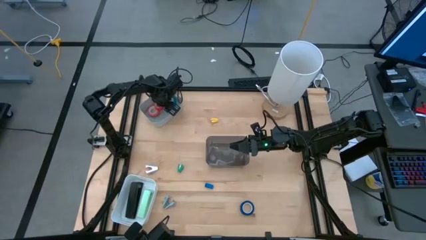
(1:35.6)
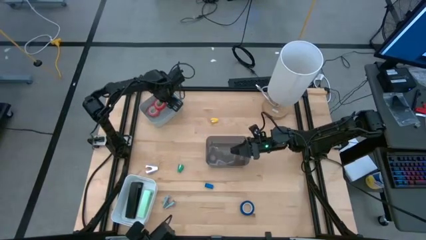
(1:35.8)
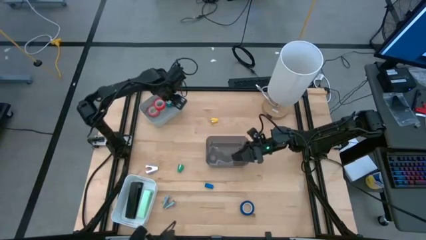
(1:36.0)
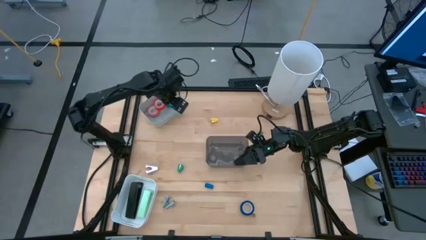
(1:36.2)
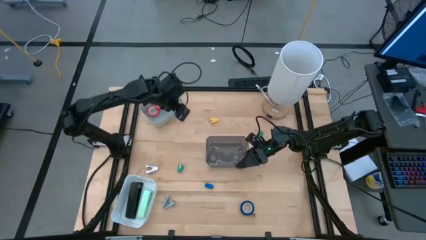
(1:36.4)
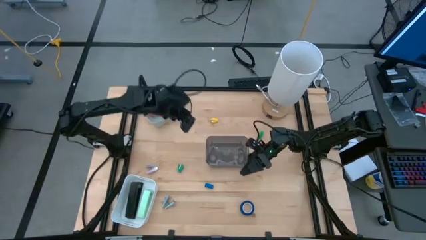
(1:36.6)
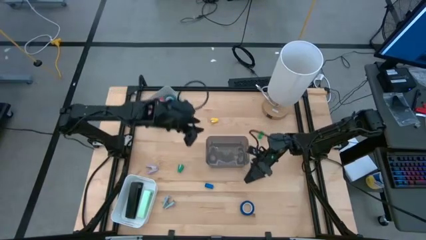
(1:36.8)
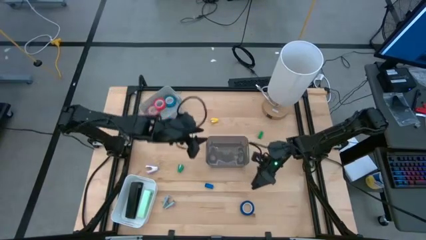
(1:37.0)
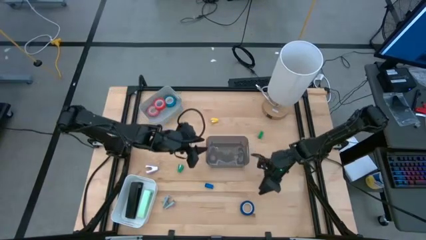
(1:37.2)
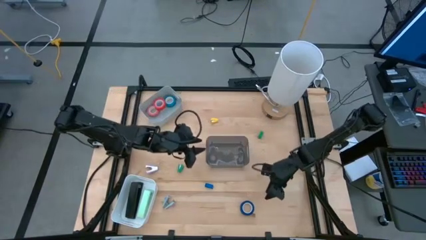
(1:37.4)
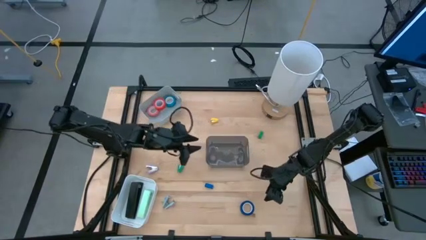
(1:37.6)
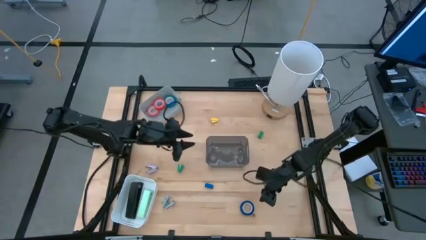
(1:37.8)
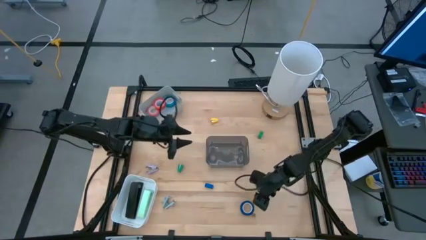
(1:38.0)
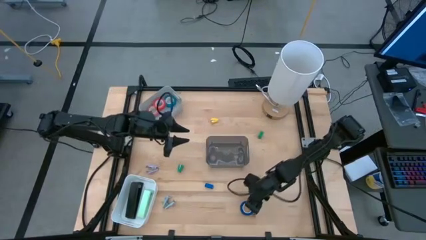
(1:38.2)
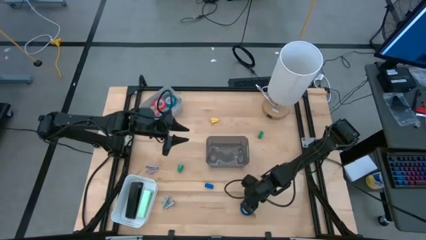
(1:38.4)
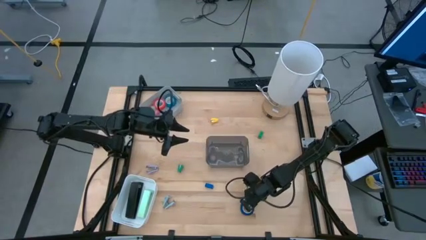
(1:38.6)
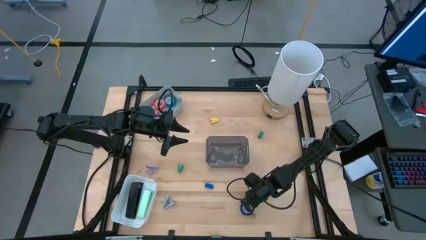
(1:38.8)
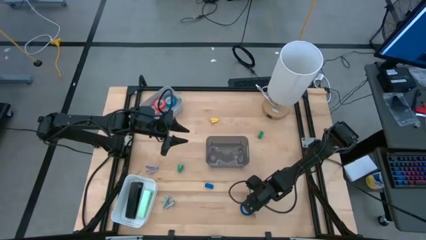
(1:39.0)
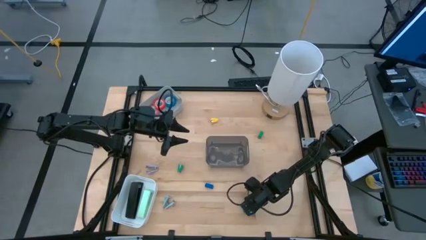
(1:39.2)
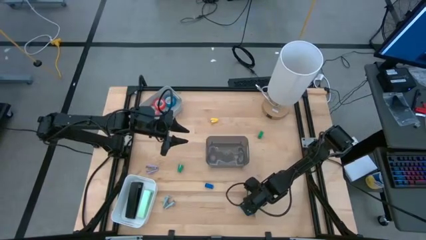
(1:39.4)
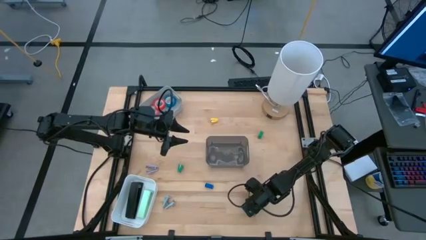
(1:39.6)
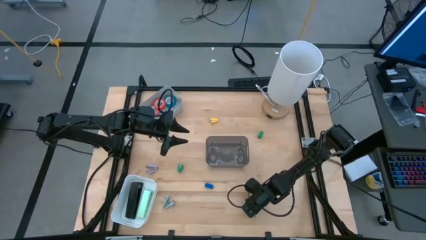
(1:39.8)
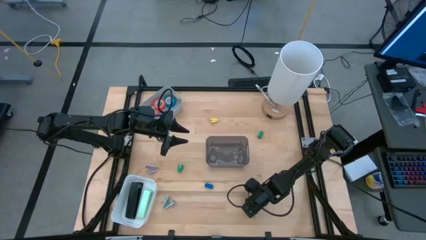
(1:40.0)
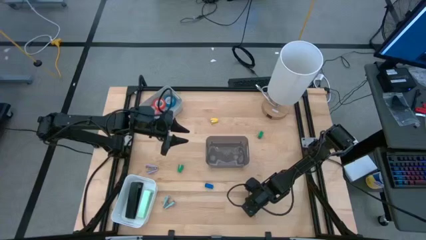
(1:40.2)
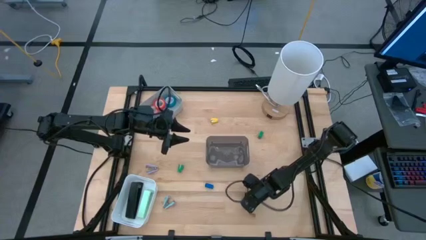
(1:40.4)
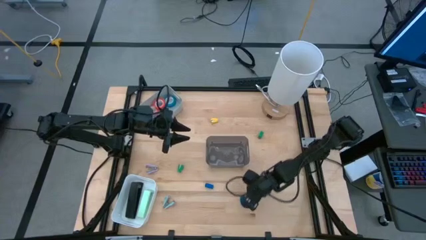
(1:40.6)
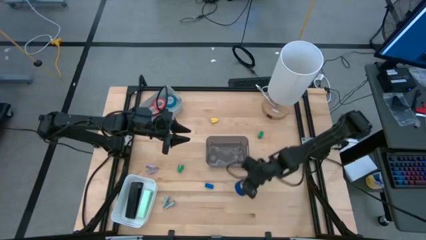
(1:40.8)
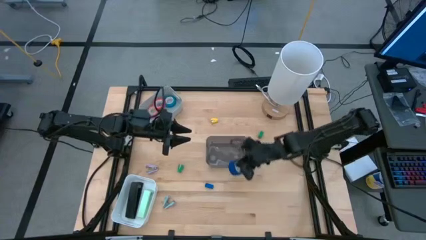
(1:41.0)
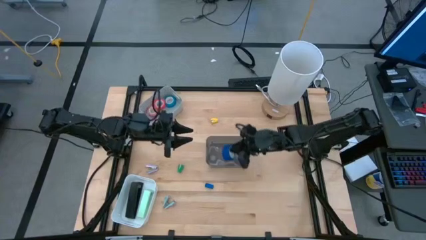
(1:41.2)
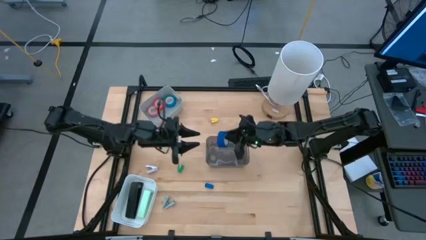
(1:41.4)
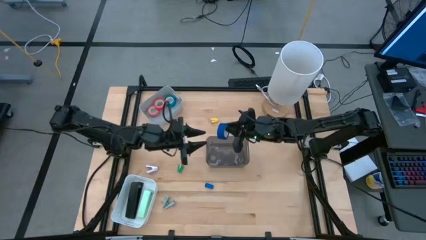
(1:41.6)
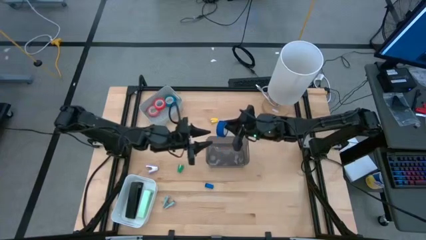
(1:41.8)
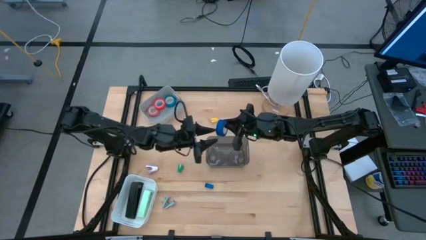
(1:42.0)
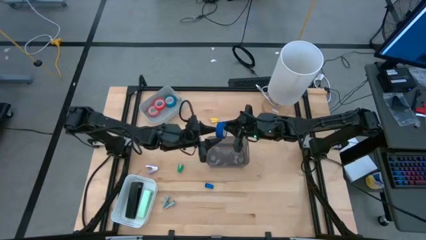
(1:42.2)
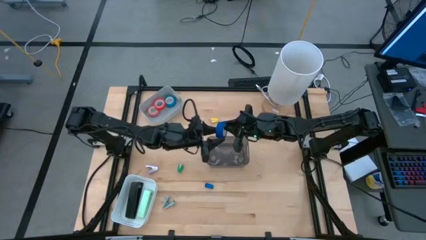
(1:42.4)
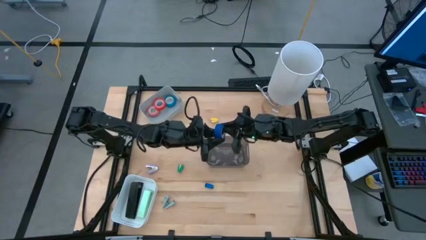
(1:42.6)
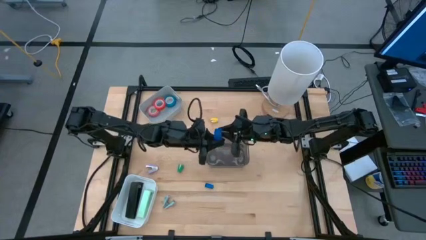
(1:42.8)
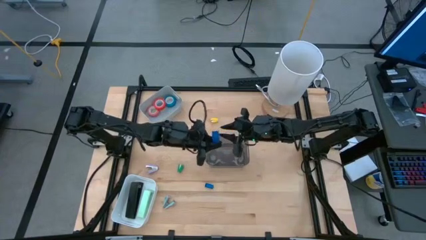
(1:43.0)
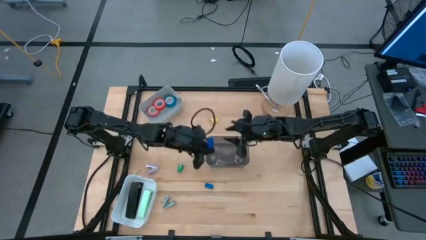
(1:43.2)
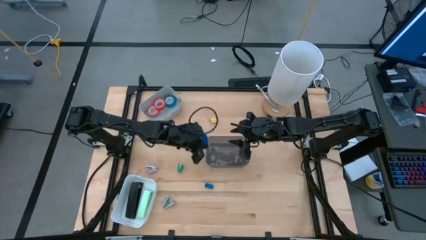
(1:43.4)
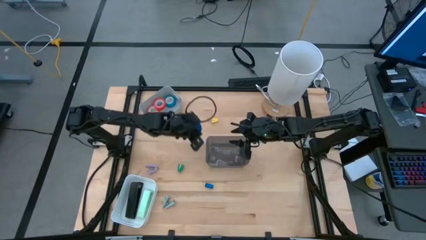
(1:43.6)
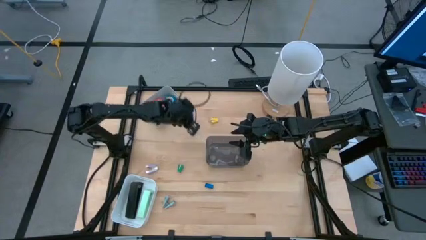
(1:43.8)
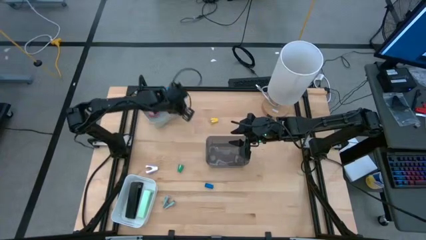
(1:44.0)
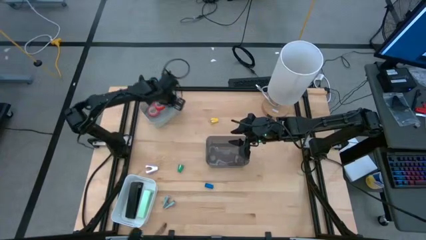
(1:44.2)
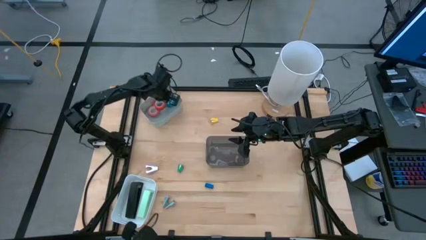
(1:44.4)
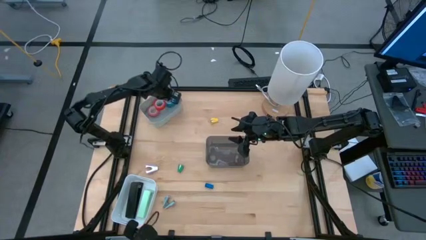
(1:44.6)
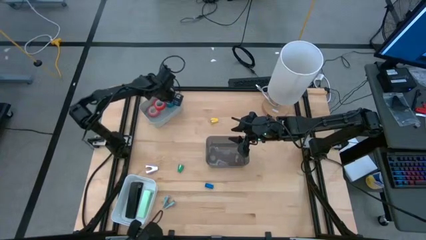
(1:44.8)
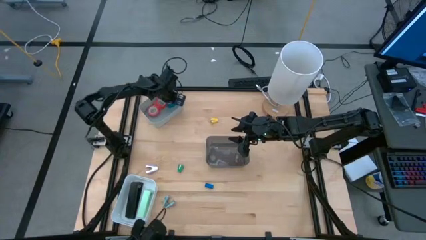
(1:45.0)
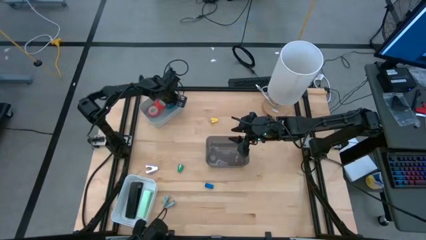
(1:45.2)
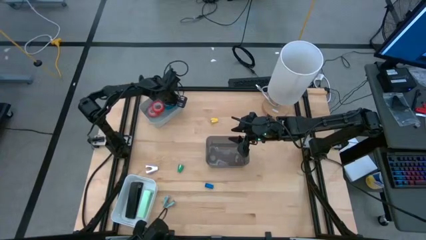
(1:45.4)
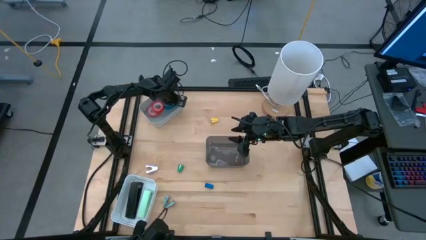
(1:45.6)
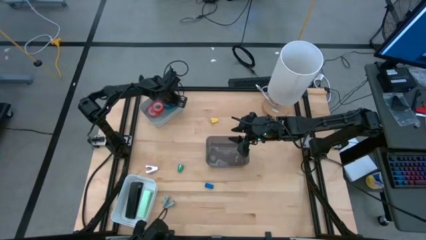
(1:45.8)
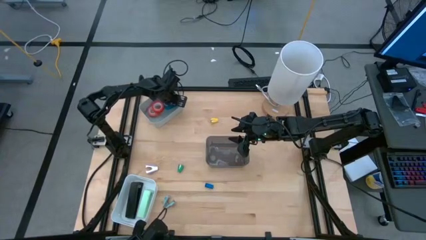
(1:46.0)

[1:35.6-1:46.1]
Task: Pick and place Stapler, Stapler remover, tape
Put the dark blue tape into the grey bin

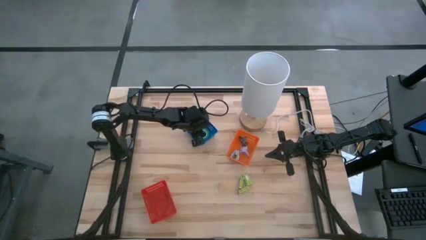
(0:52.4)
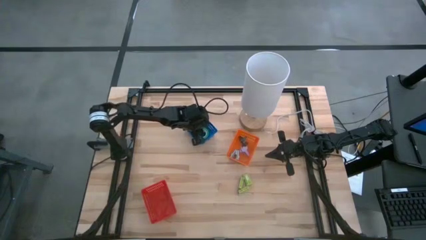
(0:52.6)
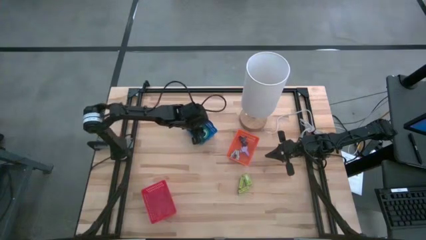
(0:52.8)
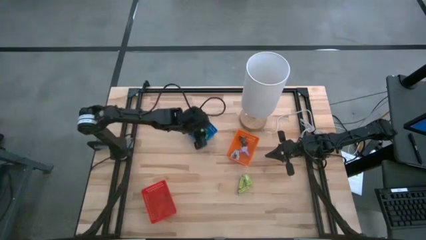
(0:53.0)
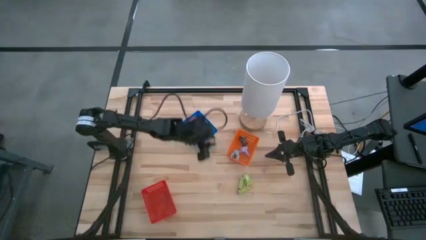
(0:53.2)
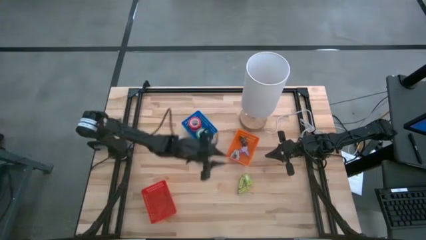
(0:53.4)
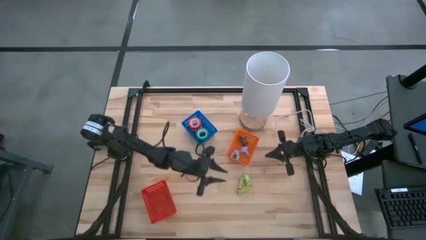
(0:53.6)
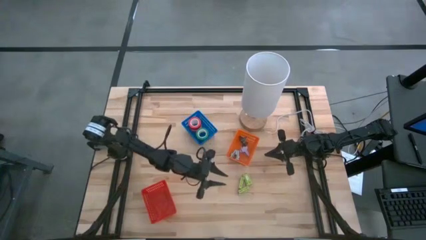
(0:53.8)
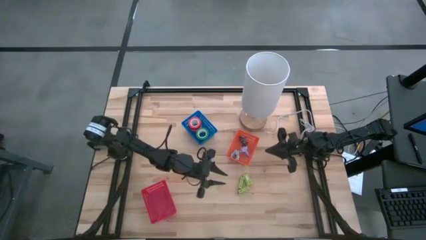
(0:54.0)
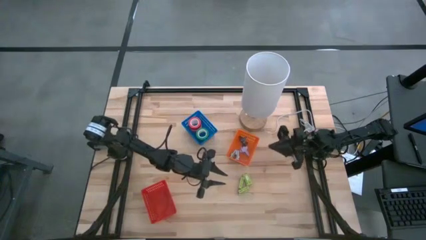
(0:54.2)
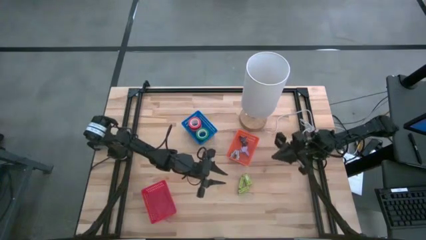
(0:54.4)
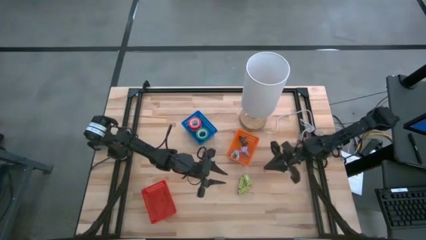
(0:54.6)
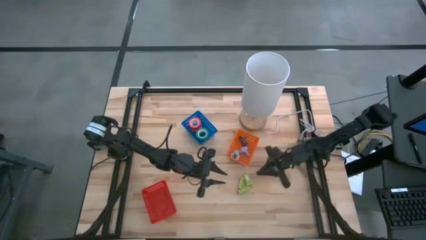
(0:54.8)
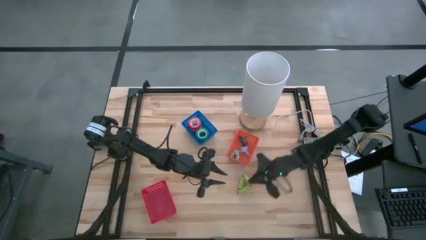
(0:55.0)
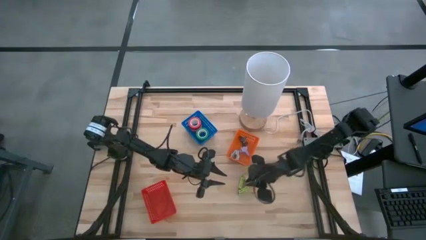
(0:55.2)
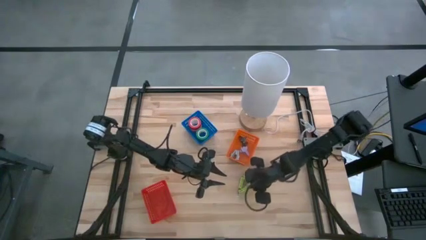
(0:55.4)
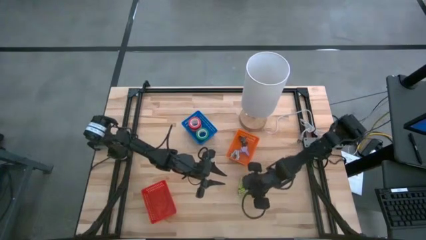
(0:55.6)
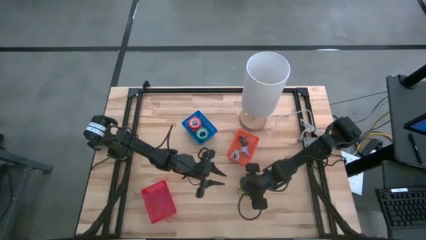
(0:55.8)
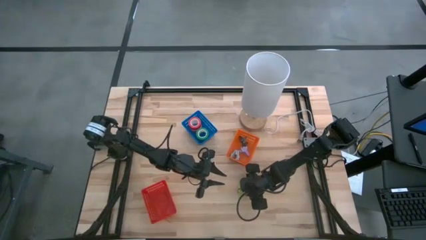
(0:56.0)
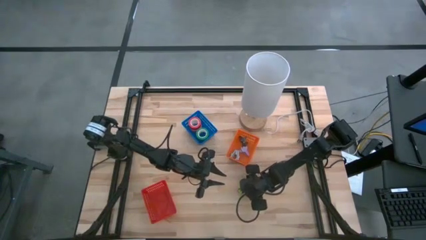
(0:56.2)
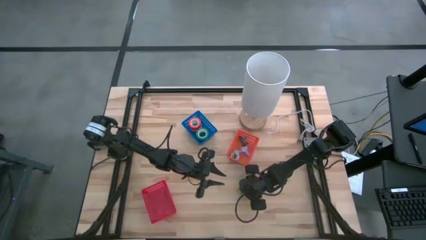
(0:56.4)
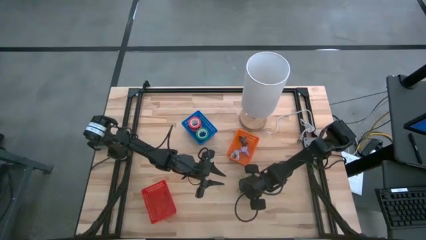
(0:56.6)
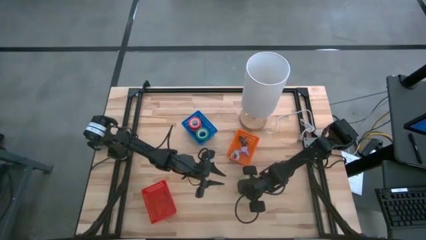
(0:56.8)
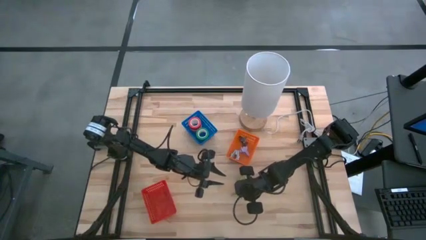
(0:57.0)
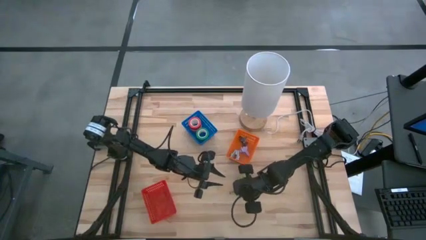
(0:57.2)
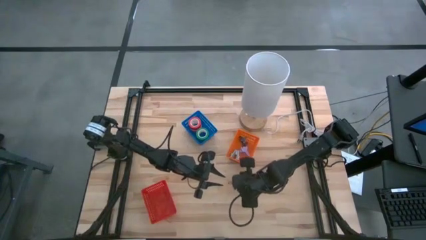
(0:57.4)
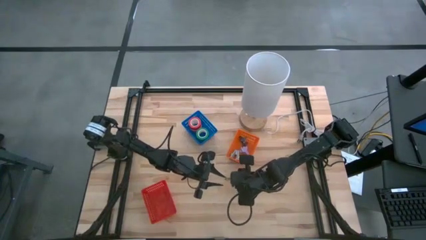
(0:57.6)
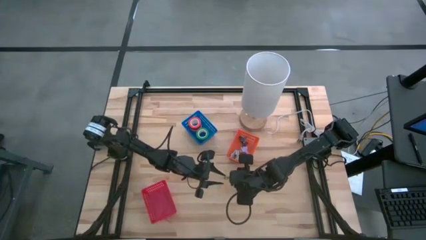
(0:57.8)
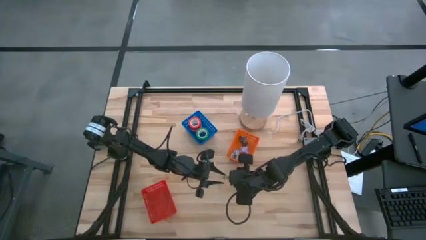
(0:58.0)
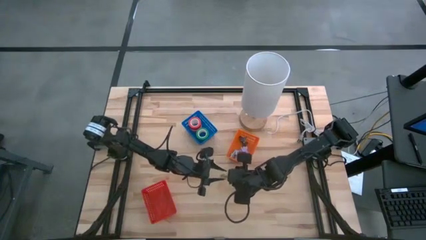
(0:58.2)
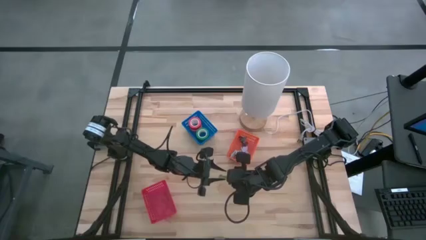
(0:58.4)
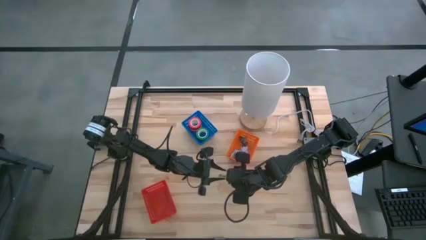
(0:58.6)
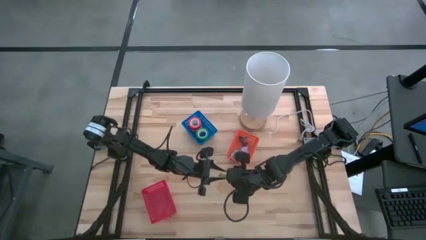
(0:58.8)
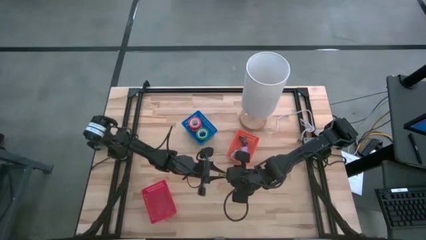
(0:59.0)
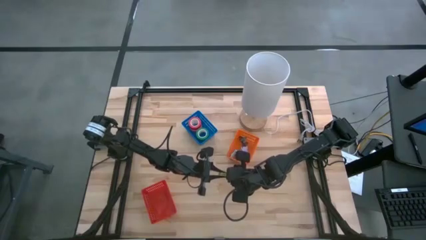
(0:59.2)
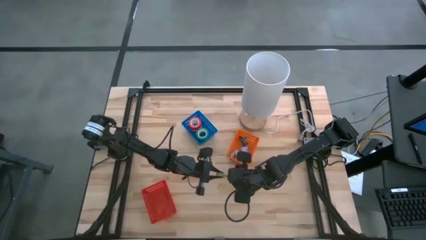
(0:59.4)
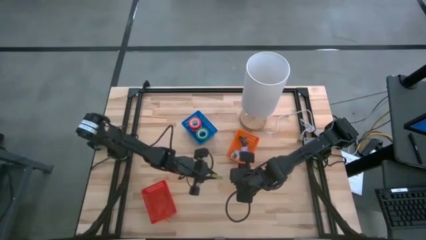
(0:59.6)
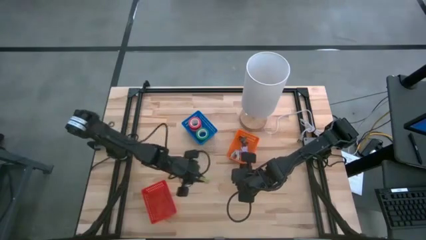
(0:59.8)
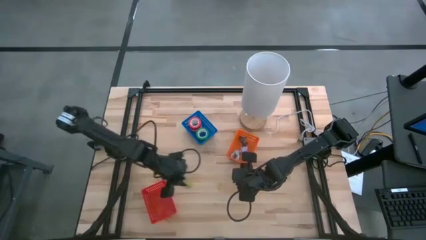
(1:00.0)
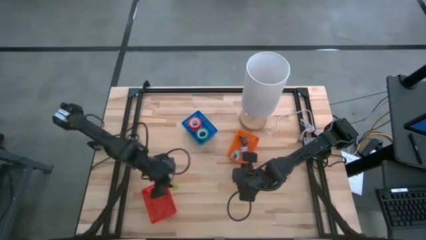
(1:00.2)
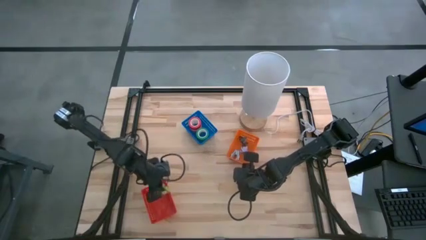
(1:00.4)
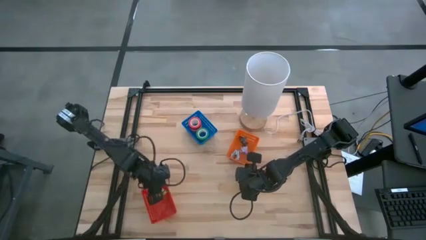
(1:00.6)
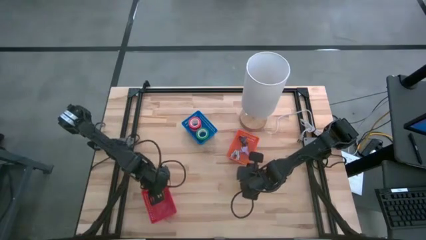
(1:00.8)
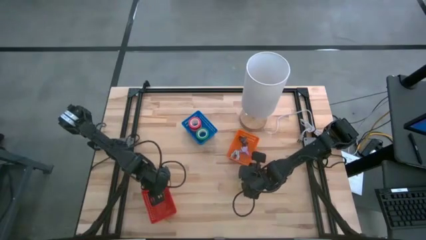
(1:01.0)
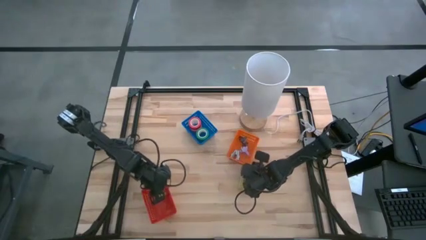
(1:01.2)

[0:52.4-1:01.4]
Task: Pick and place Stapler, Stapler remover, tape
Put the green staple boxed into the red basket
